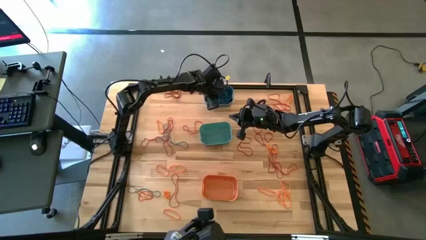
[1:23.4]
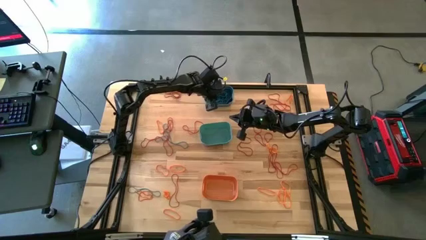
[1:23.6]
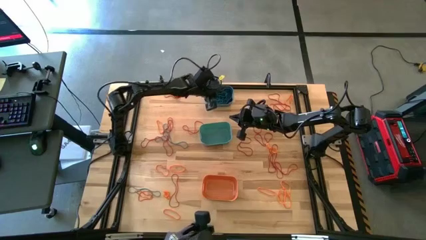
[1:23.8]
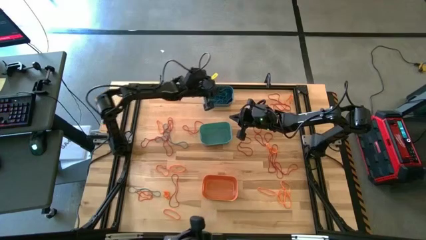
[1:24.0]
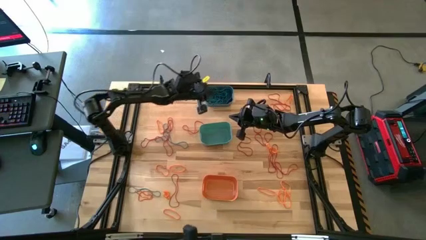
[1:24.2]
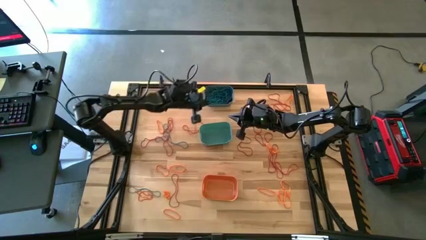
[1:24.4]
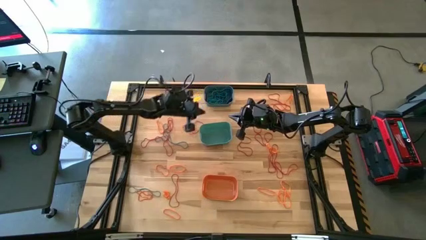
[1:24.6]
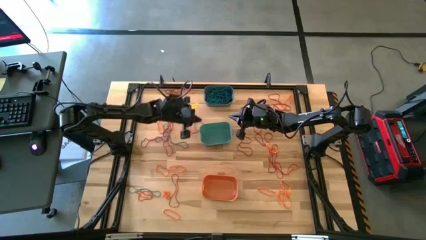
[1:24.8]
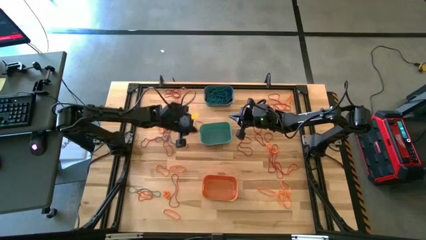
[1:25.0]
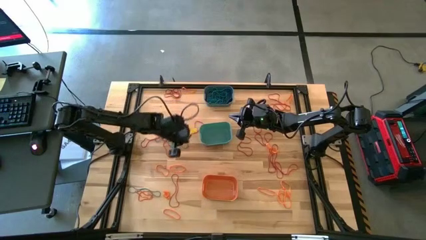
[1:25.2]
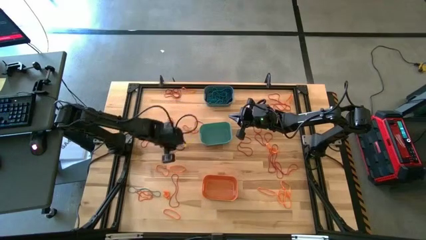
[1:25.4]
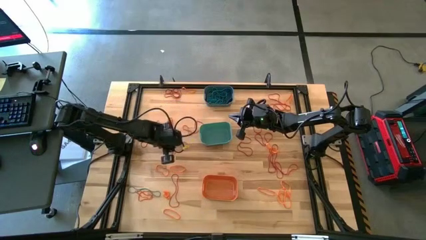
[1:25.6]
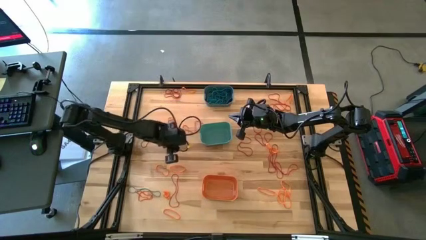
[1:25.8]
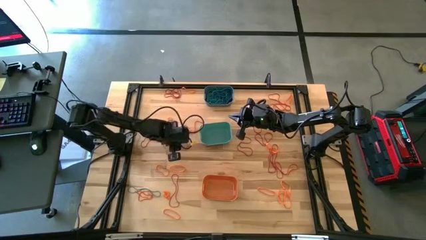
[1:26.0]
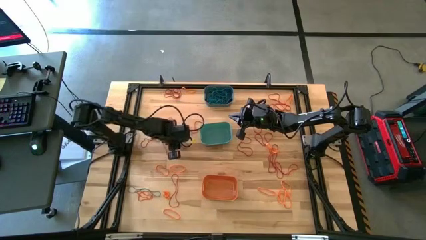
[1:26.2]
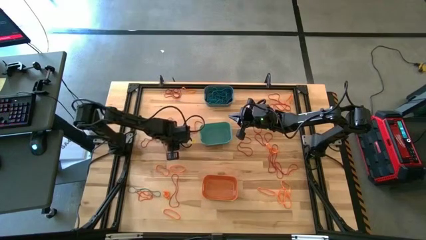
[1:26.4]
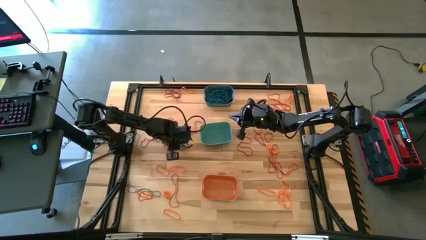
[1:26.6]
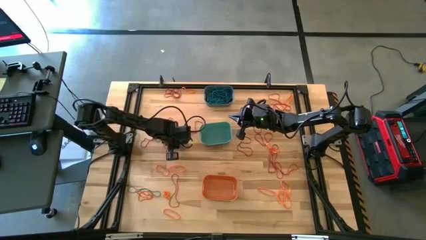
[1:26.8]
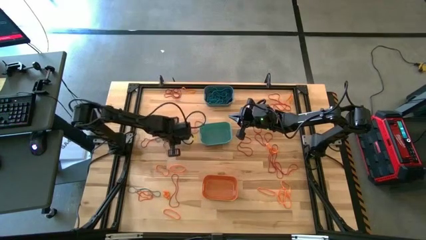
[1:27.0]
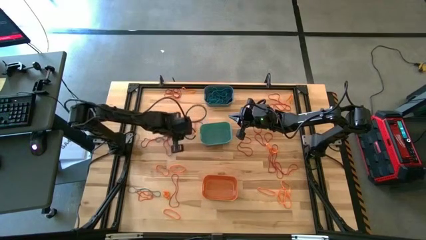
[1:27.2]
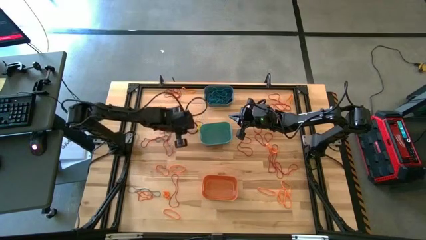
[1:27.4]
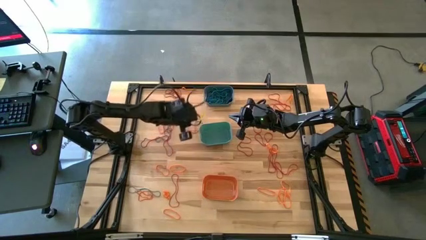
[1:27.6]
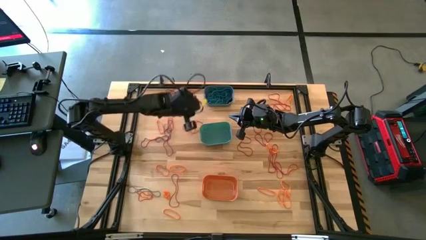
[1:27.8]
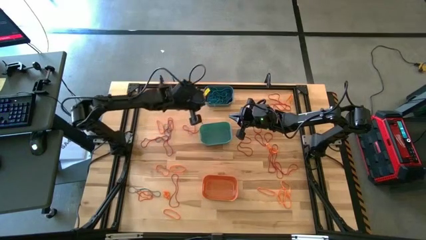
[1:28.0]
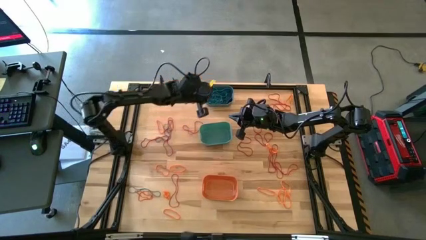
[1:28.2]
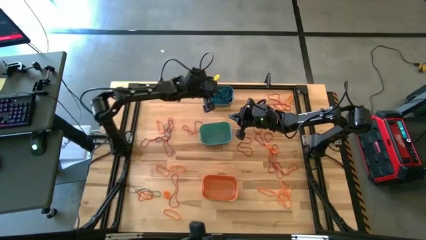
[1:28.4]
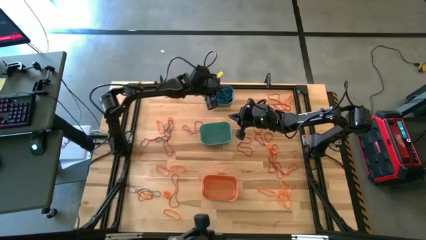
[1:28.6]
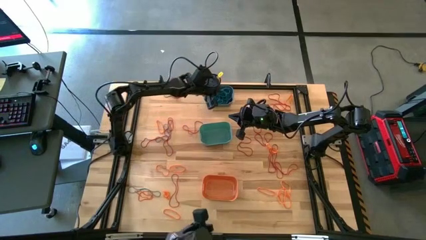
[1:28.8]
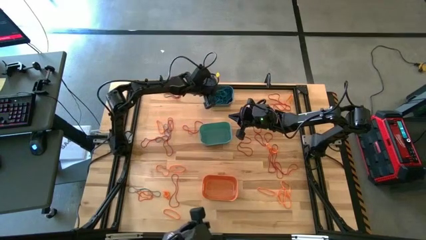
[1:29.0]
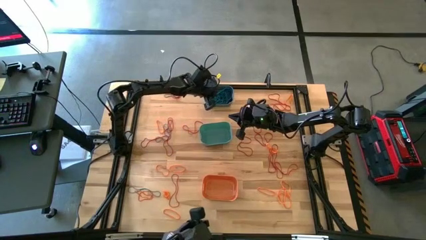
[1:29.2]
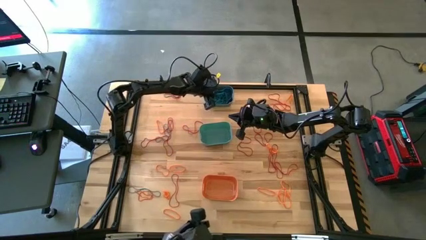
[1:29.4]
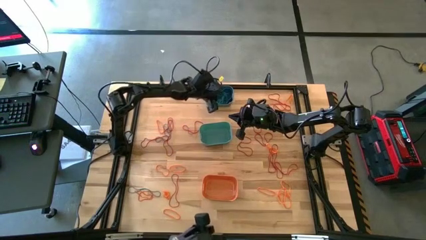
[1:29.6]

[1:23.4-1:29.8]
Task: Sort rubber bands into baskets
Put the blue rubber band into the blue bin

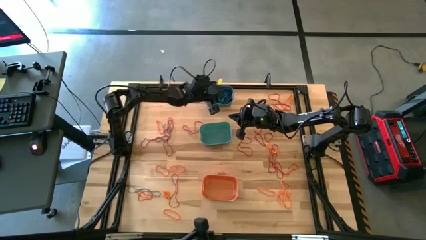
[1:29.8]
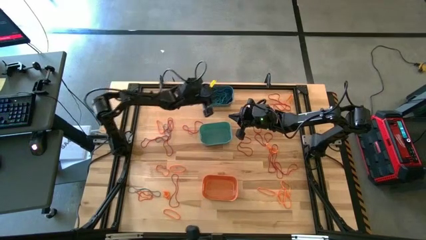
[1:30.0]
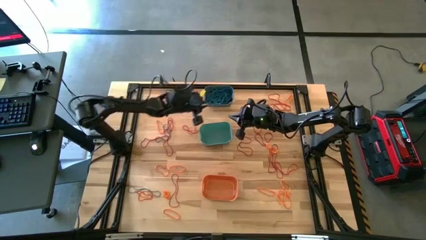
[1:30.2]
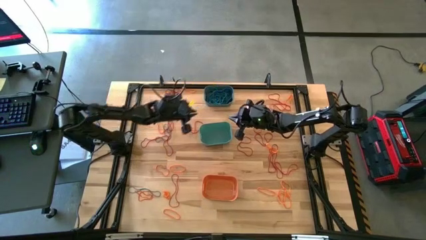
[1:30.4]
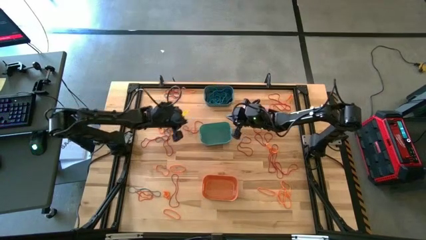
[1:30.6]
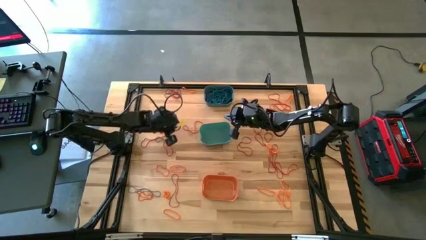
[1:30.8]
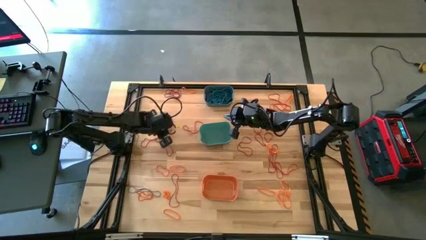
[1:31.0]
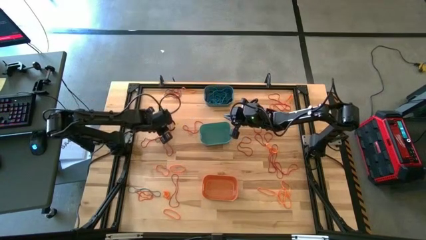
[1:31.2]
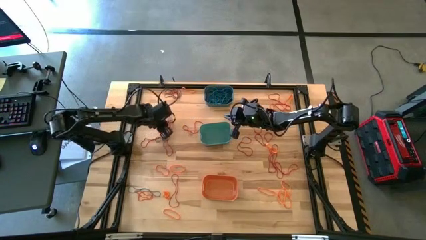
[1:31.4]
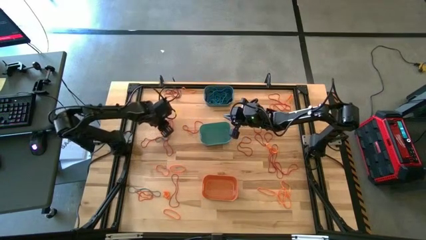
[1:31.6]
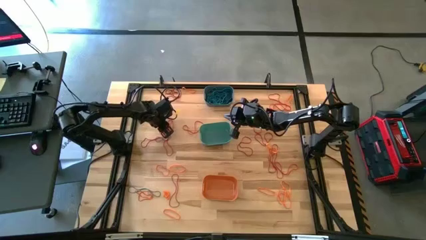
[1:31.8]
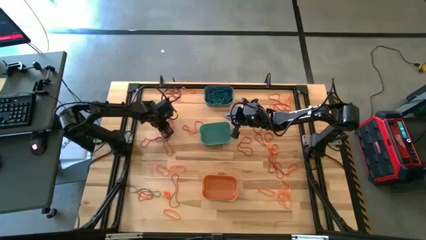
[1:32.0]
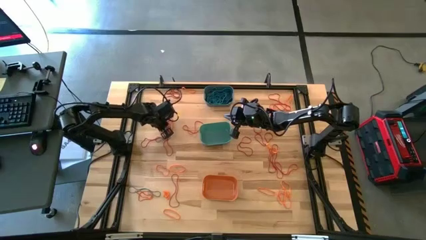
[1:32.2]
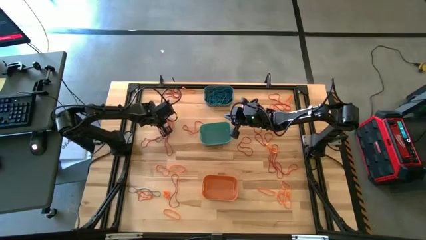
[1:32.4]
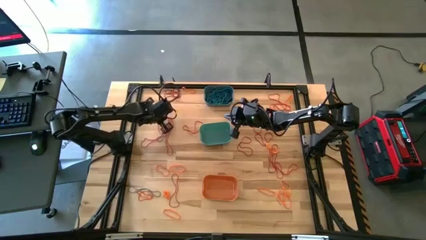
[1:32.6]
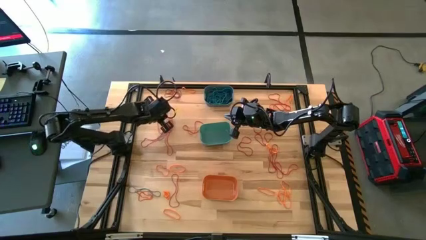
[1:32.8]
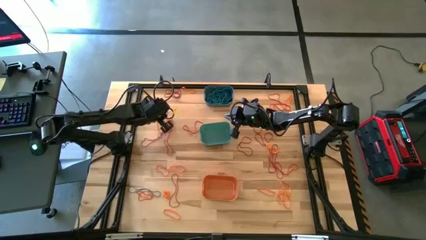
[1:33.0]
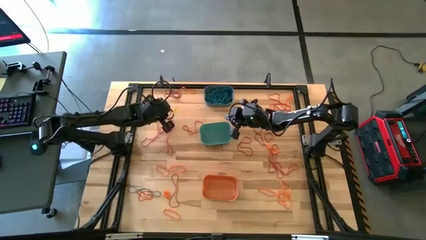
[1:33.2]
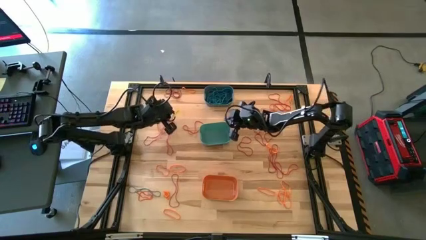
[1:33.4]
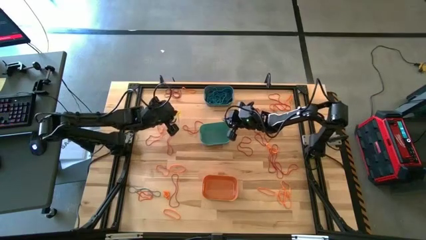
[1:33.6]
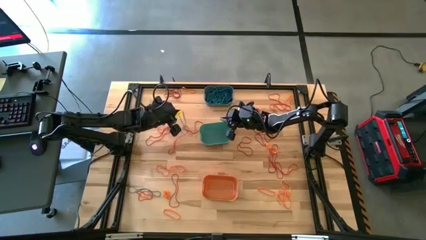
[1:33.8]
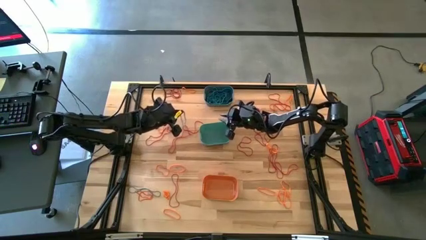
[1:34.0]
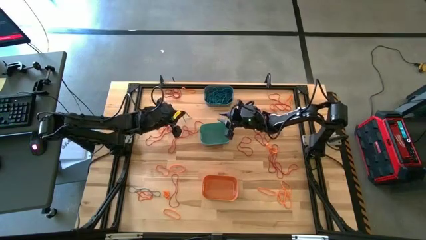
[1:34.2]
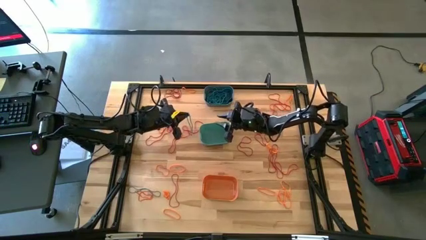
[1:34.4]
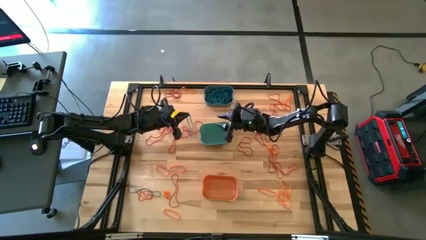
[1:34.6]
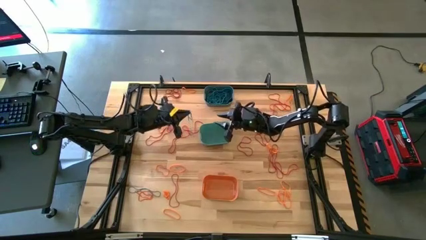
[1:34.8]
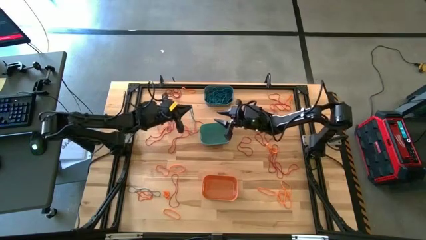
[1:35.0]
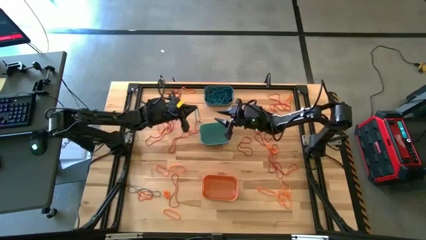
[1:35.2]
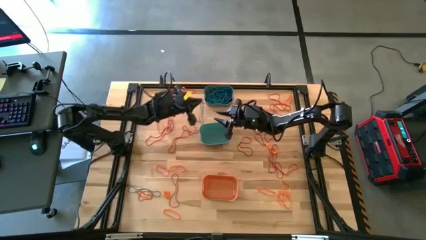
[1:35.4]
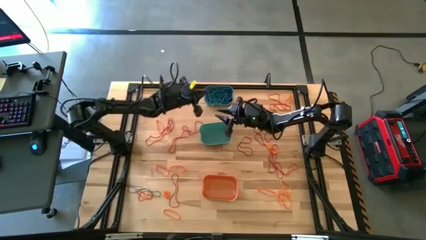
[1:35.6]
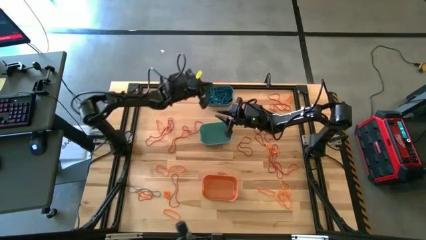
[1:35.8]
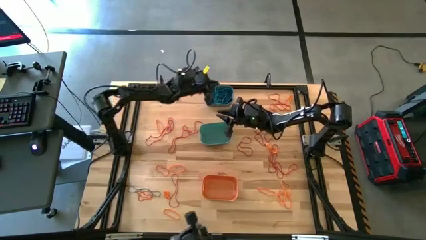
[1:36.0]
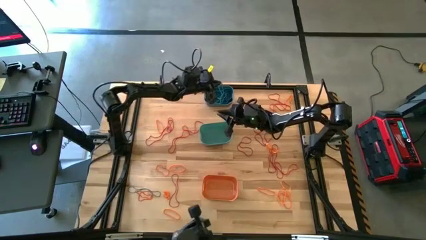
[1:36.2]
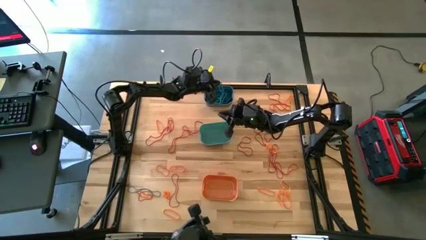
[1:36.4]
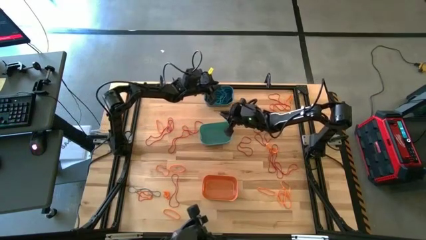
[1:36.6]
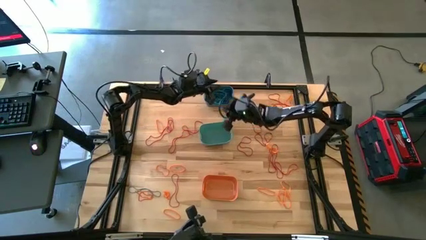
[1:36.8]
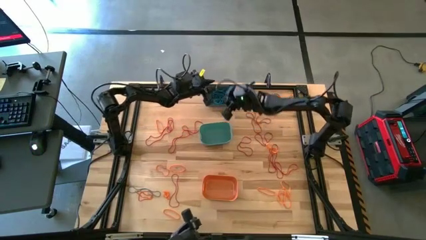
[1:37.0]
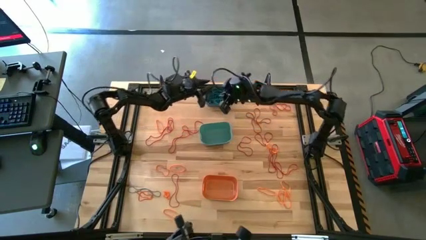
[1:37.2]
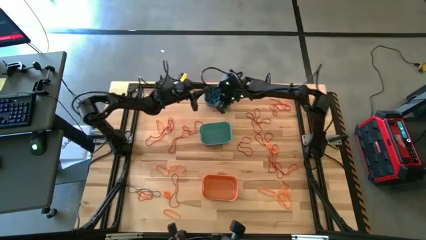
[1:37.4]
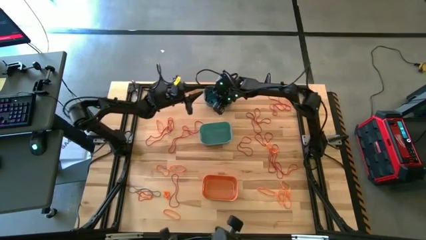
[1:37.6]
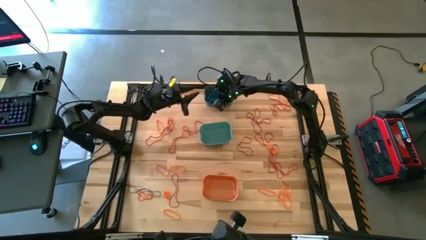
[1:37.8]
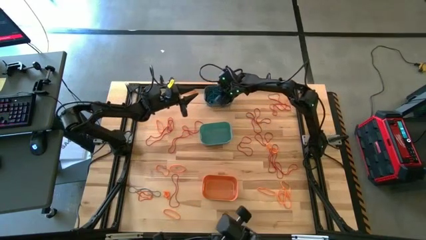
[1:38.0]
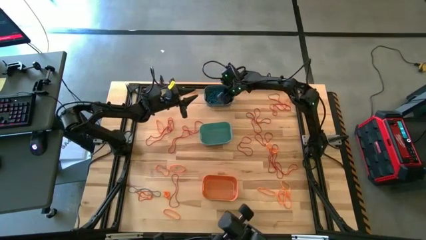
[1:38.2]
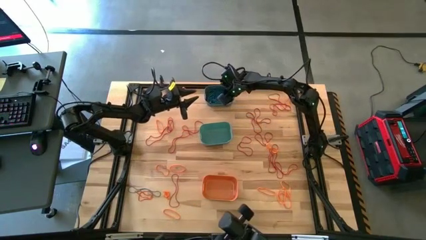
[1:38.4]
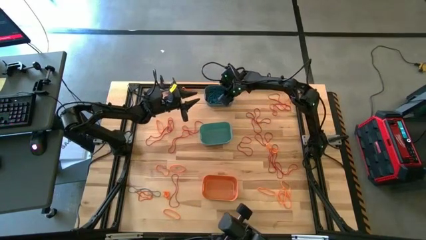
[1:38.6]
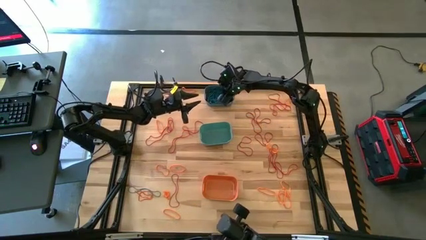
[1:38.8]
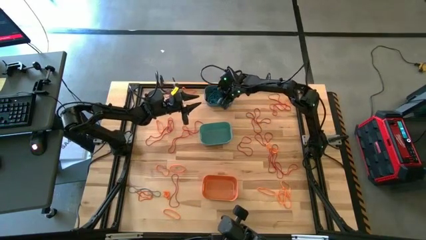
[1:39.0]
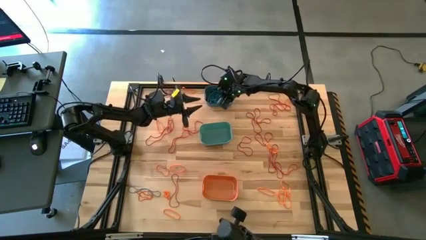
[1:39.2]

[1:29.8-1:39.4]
Put the blue rubber band into the blue bin
